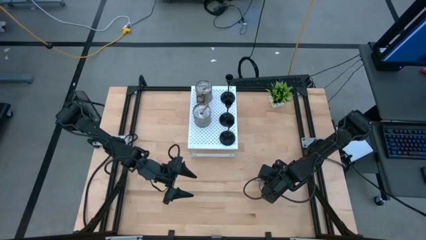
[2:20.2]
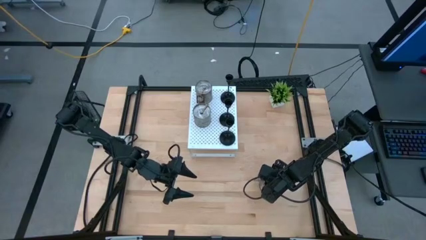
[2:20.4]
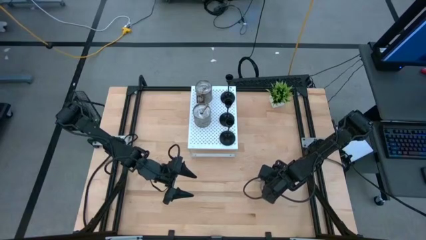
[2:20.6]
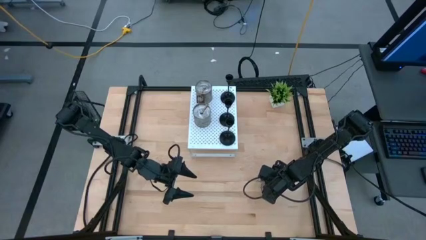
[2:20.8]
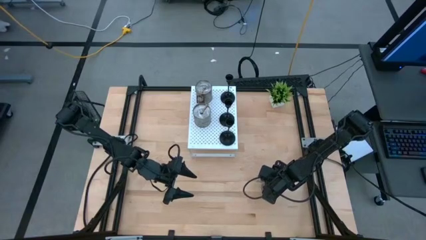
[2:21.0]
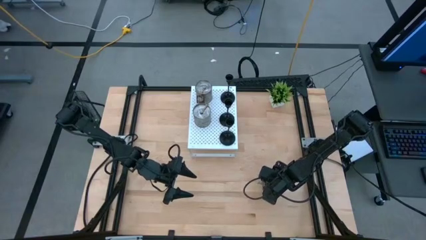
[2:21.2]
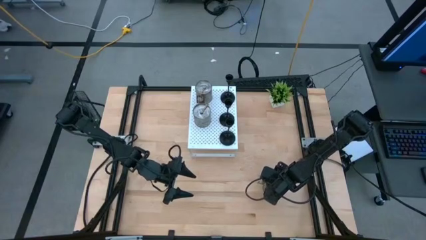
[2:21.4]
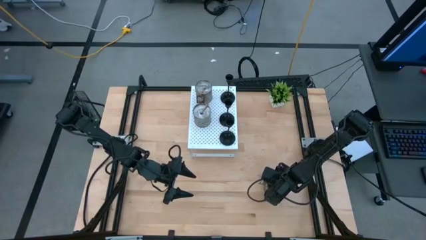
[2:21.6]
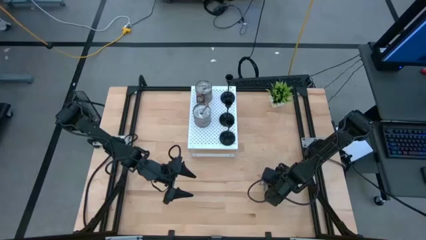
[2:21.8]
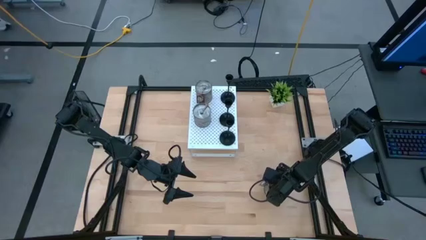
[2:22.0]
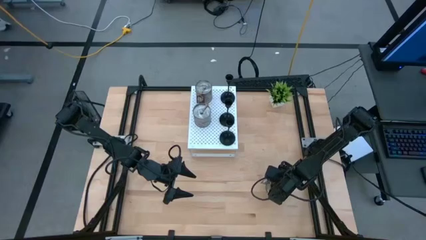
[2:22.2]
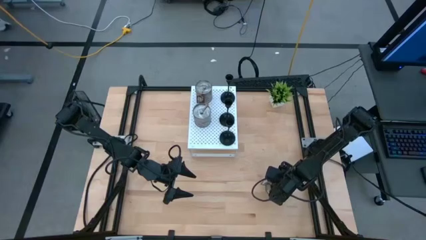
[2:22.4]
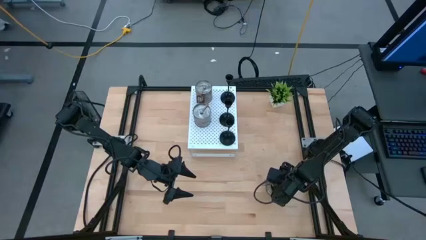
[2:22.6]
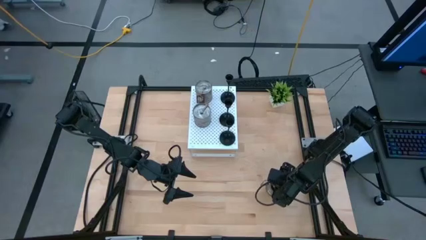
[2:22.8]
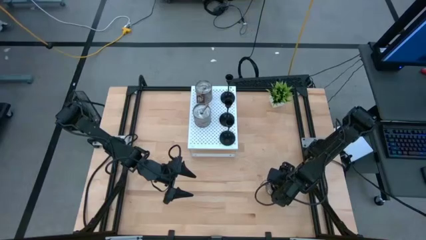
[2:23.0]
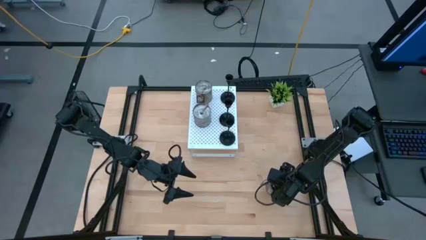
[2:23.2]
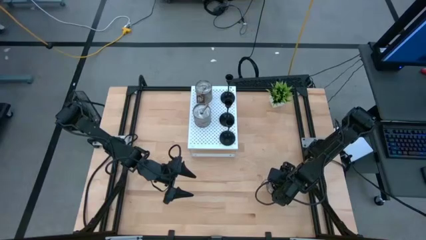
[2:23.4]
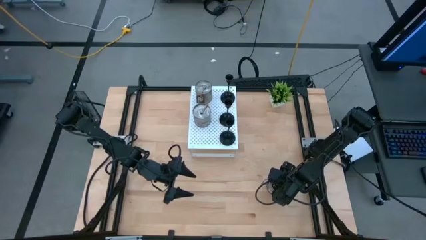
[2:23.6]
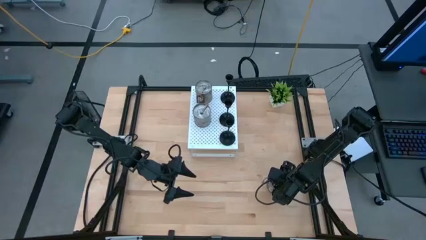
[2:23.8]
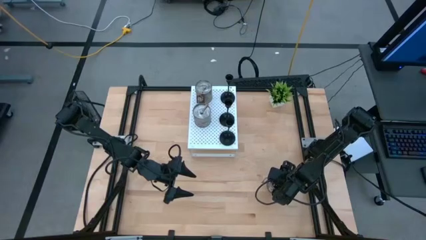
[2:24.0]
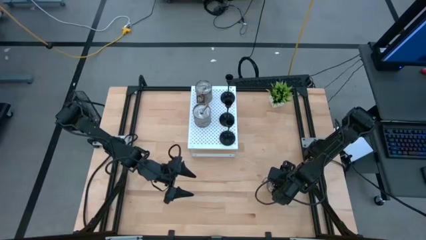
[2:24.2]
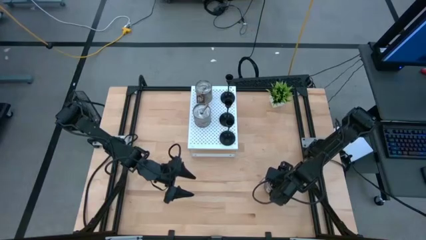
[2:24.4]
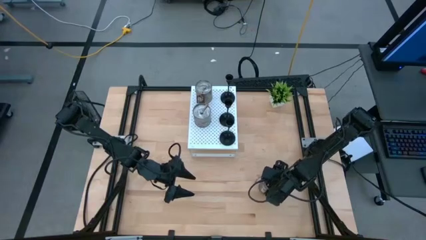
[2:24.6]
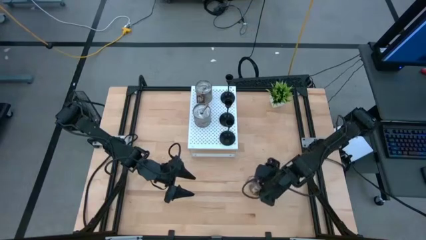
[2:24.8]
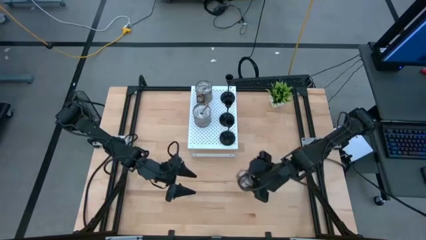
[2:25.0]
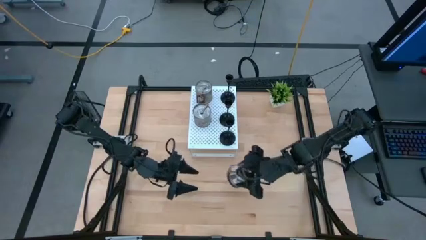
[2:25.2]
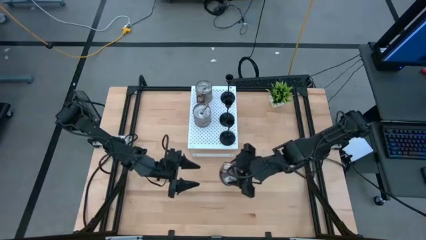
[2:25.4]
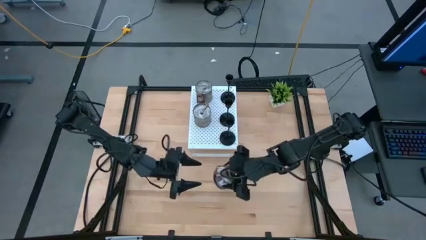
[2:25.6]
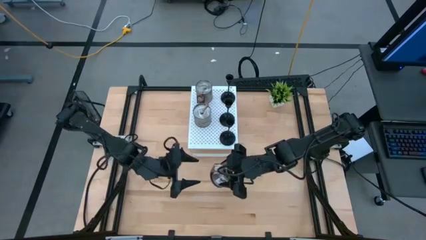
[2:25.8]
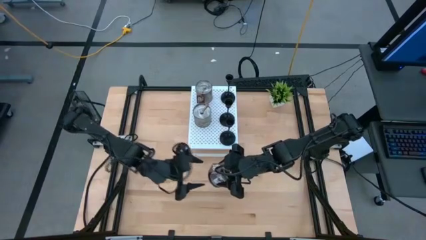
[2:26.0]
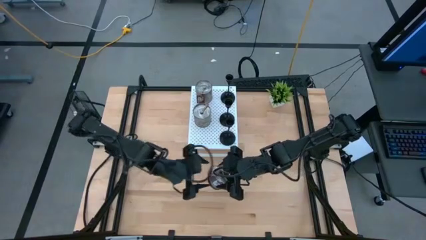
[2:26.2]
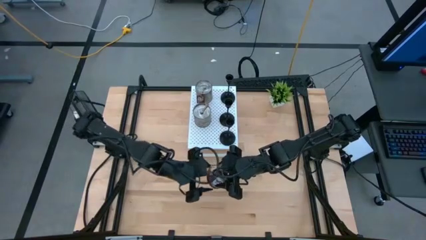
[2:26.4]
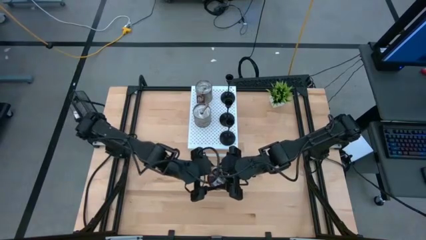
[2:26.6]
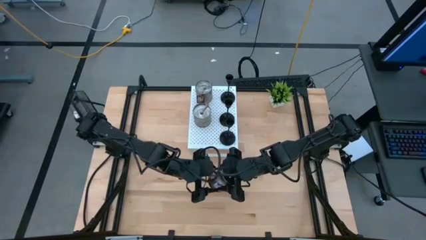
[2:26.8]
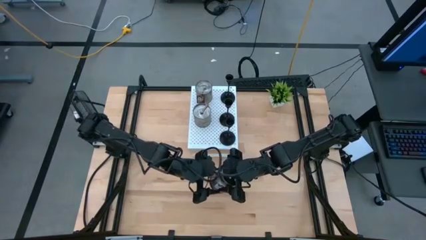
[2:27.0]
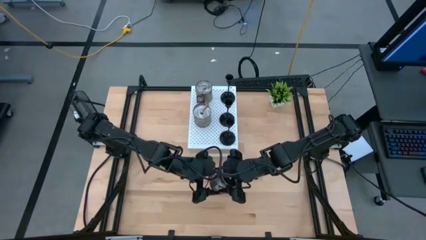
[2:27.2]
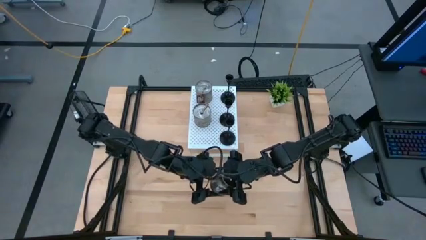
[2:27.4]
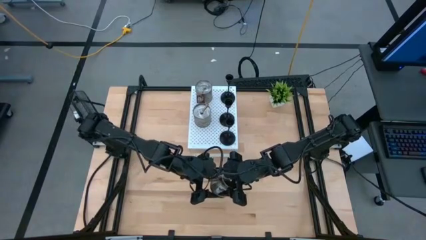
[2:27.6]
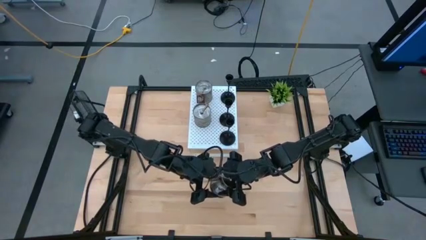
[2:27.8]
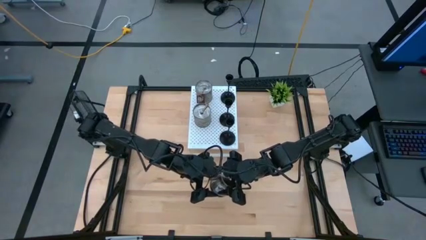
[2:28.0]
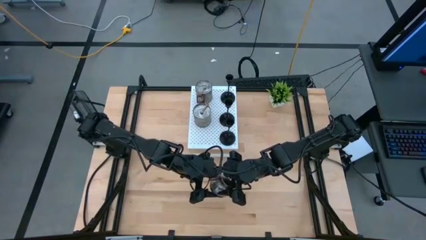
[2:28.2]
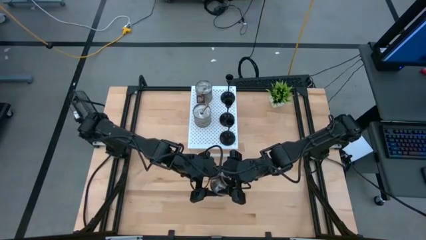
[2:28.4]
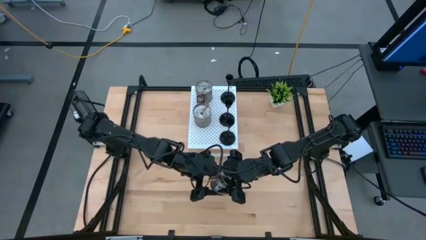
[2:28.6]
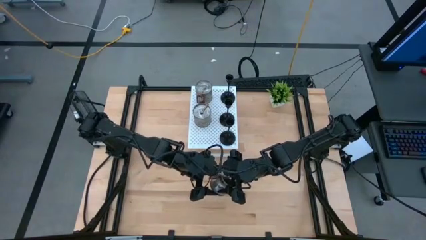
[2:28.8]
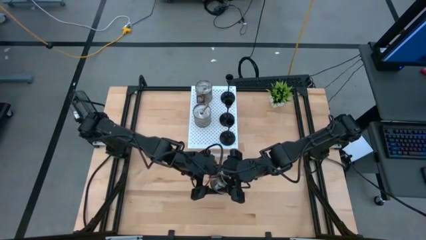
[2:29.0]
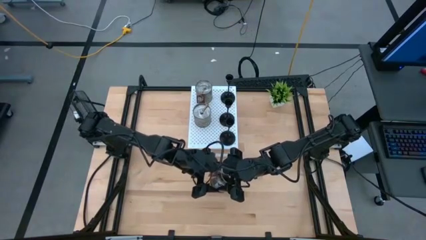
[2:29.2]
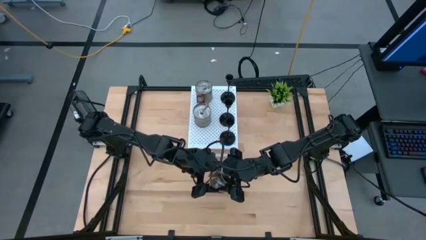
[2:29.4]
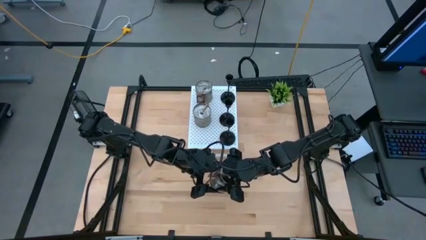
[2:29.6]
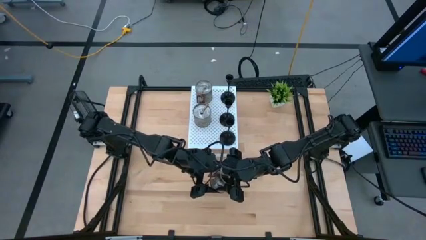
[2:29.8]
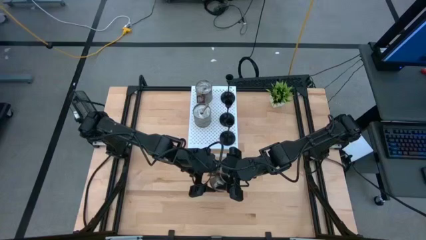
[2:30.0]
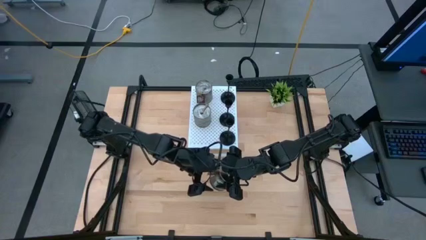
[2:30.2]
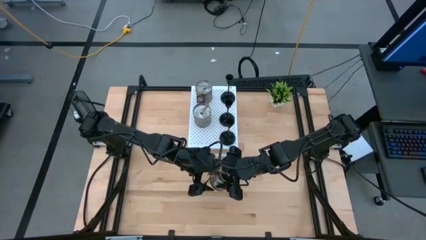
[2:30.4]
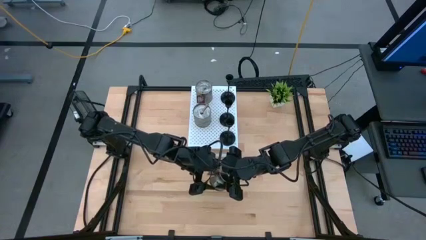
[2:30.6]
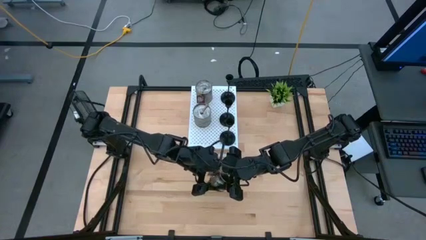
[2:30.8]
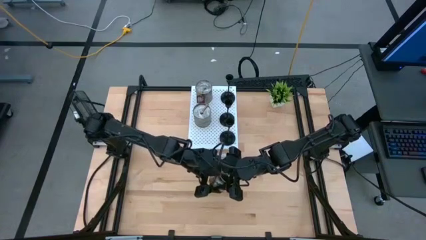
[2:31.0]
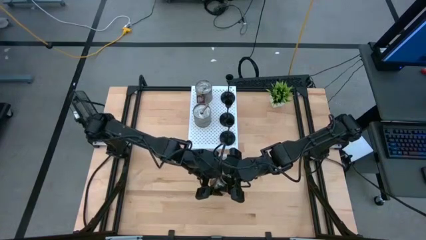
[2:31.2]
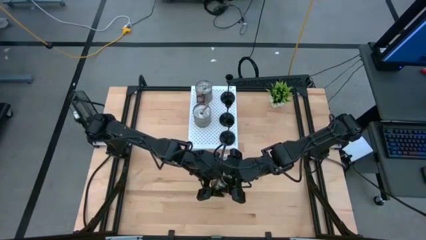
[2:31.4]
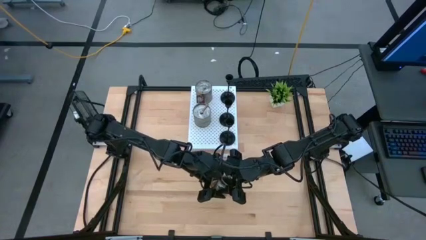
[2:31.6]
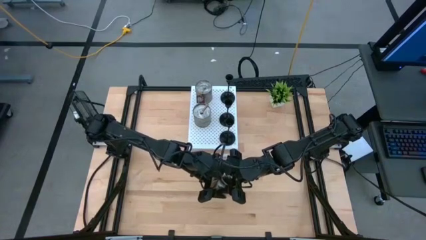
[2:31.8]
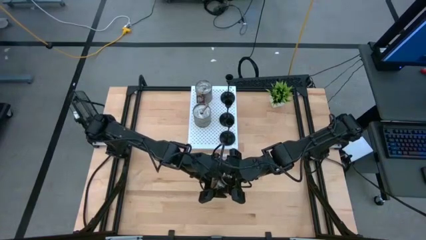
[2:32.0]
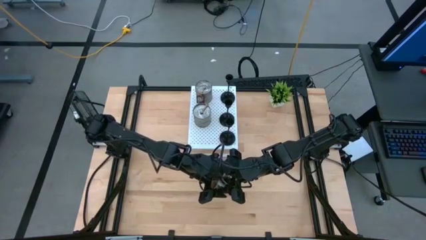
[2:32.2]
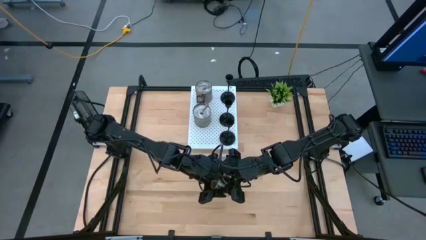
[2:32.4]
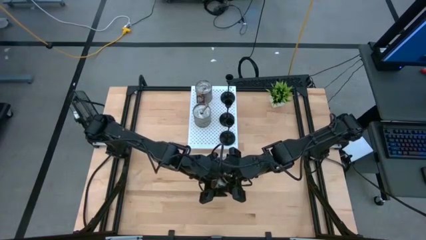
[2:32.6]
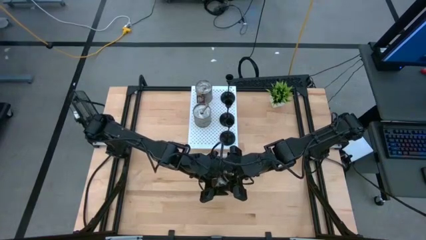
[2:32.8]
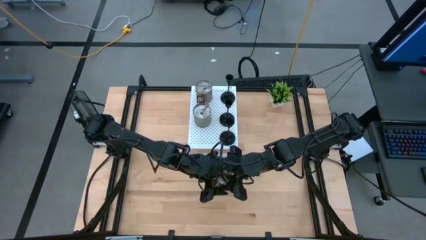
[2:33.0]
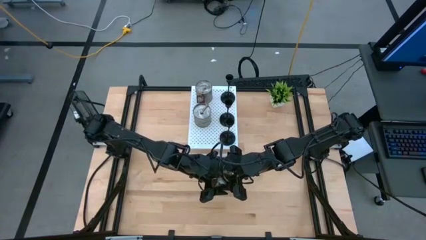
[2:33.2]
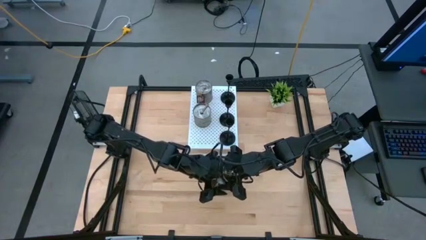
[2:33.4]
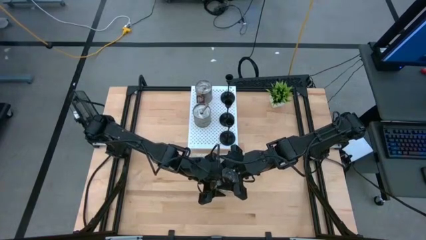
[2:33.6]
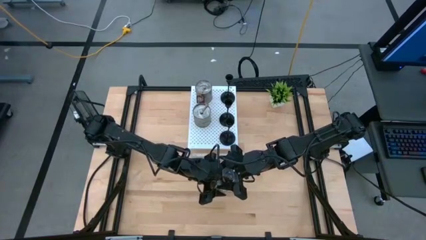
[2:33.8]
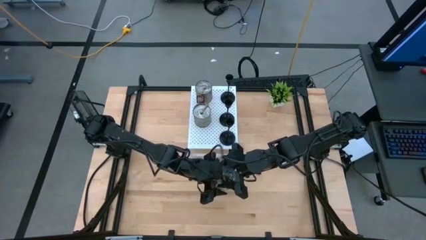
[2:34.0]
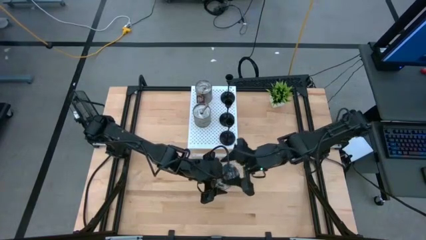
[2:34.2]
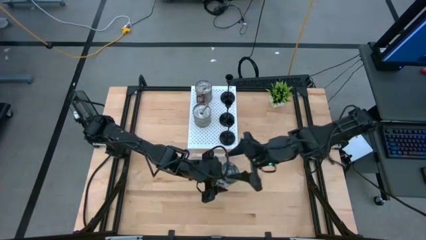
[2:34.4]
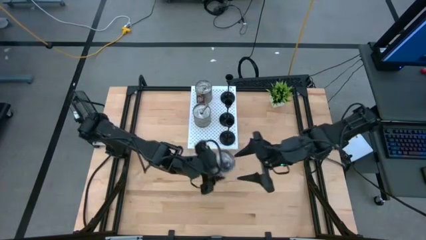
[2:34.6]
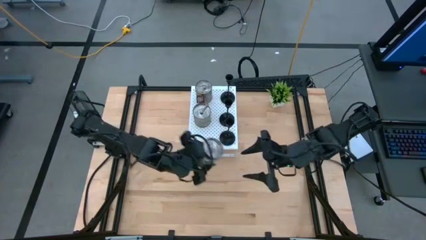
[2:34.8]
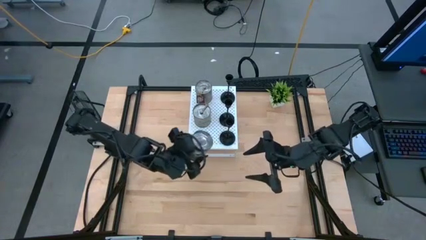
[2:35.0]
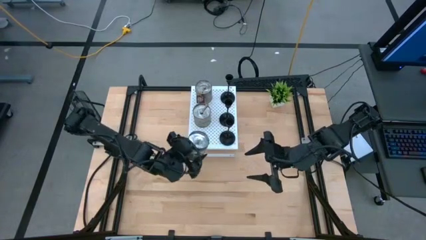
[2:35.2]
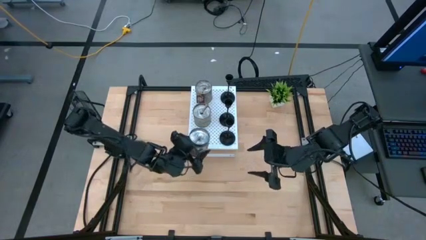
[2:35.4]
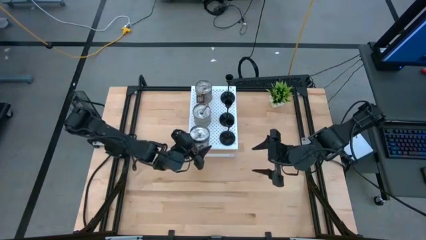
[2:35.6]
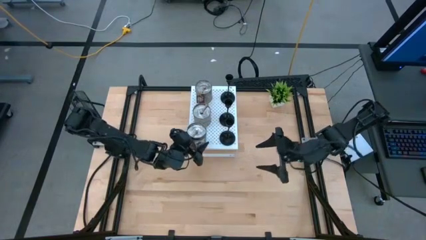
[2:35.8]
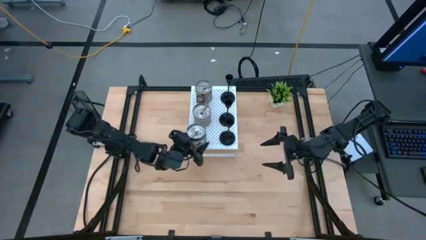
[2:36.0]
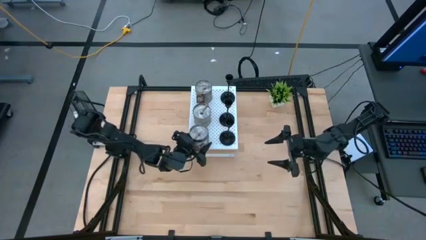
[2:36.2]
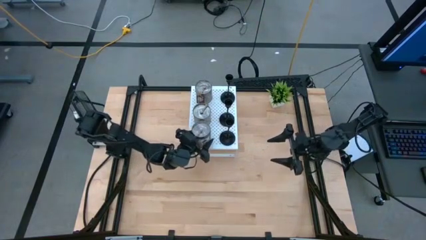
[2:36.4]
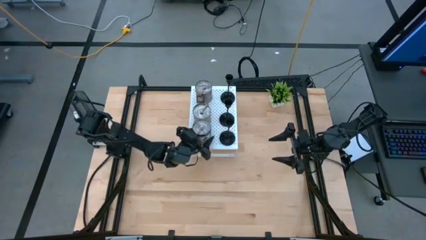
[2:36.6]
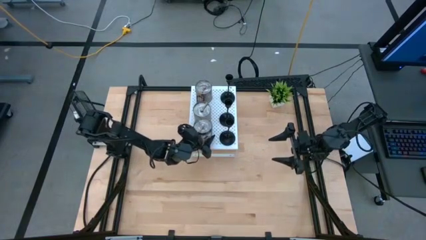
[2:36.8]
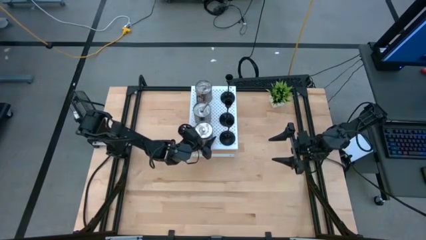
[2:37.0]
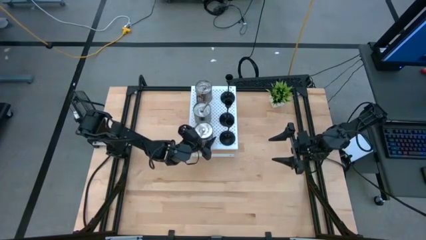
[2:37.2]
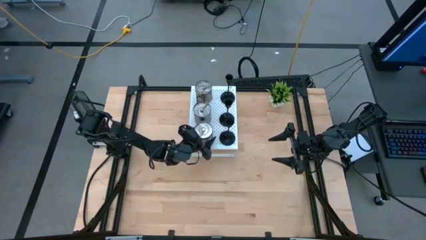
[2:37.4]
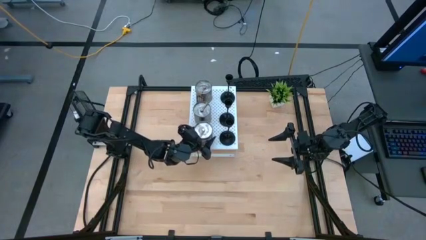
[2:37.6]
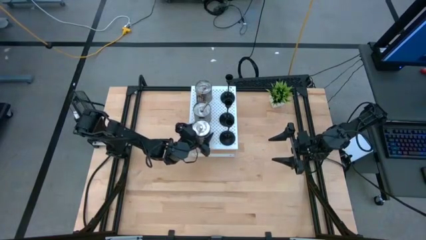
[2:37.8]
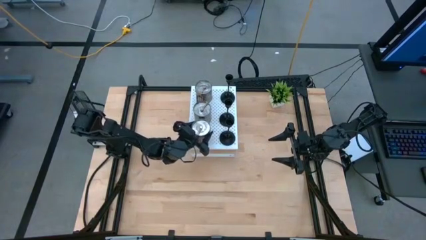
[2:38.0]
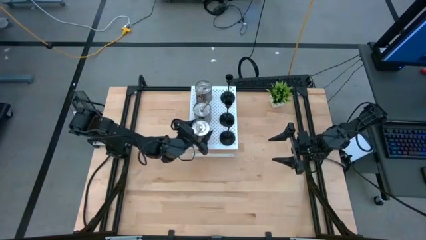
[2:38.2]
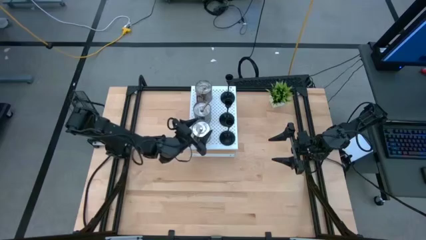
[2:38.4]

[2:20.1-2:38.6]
Task: Pick & Place candle stick holders
Put the brown scented candle on the shelf aligned with the brown scented candles
